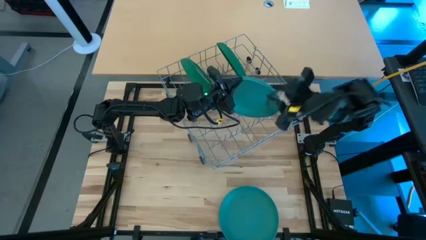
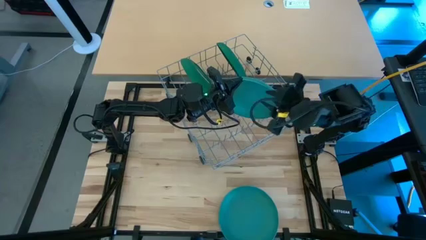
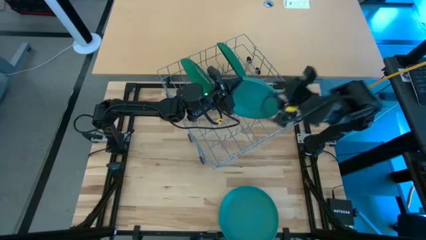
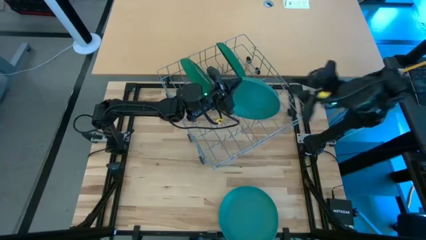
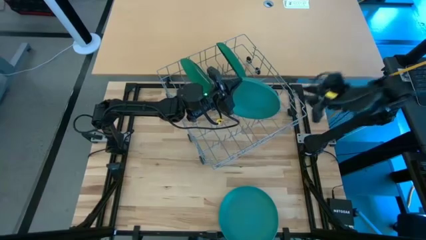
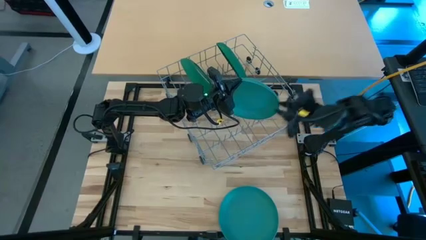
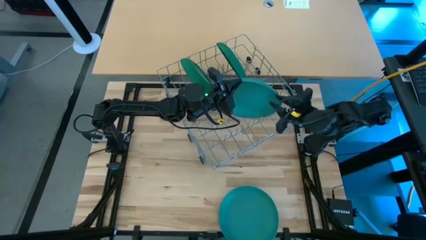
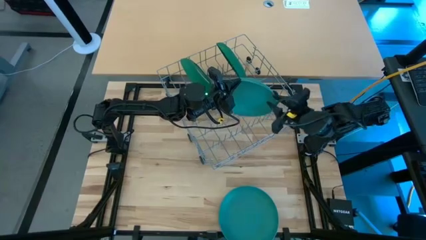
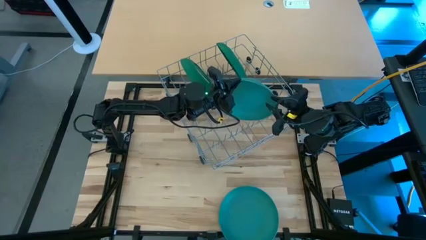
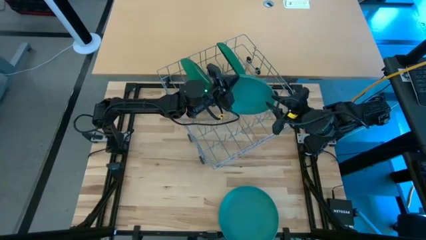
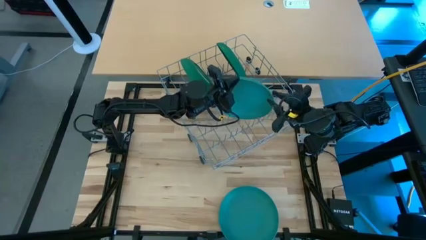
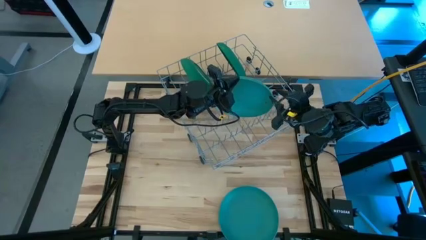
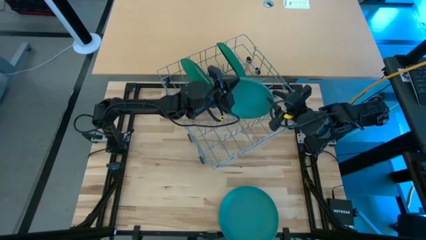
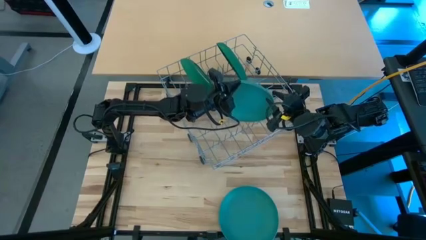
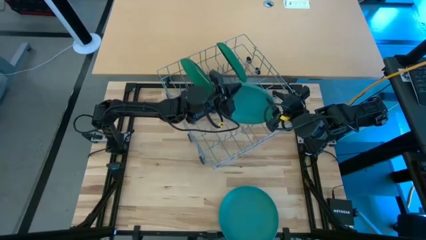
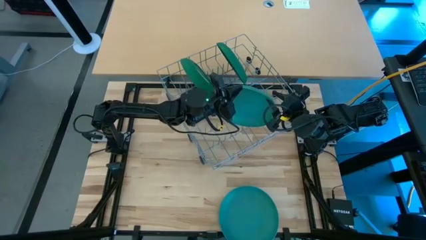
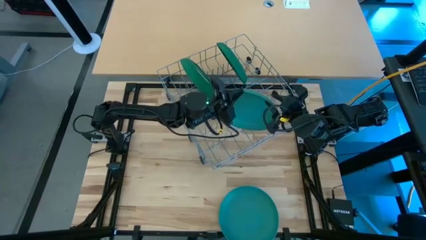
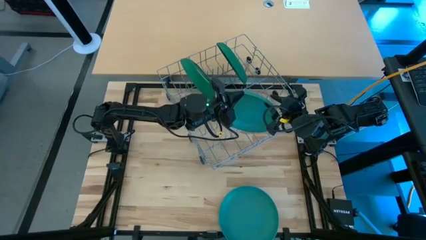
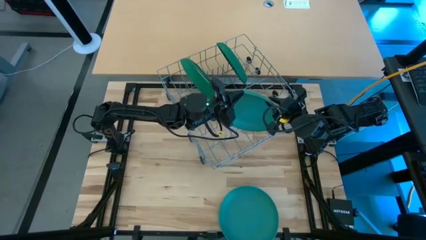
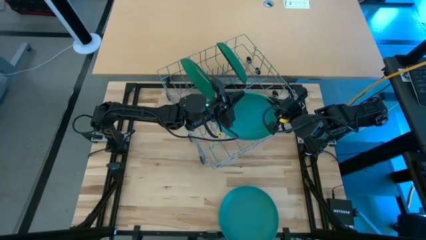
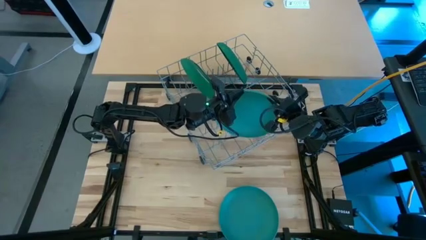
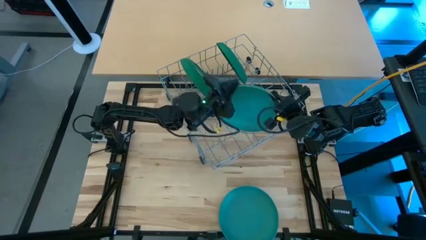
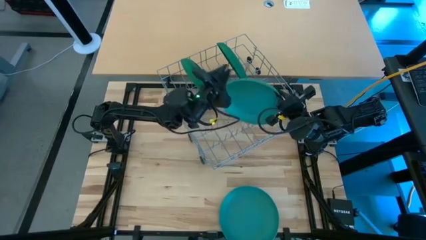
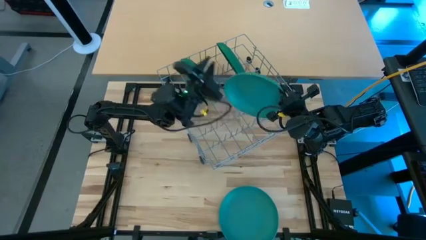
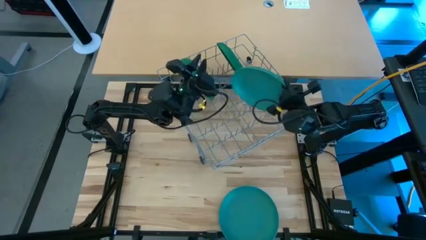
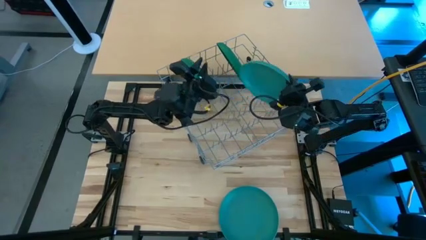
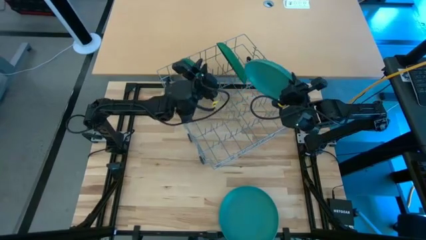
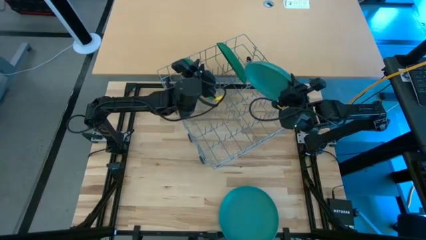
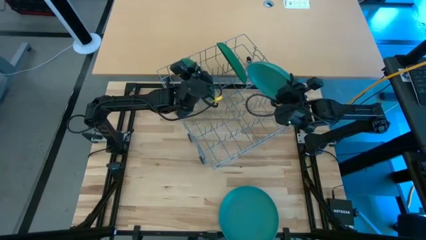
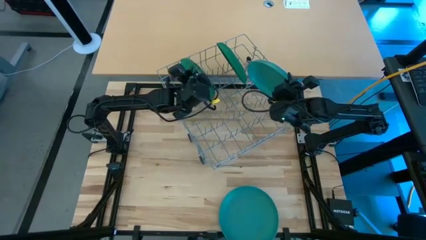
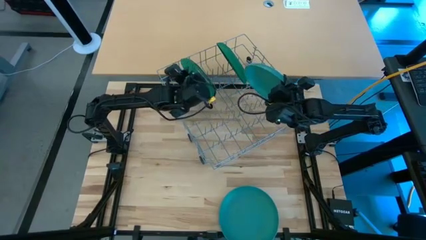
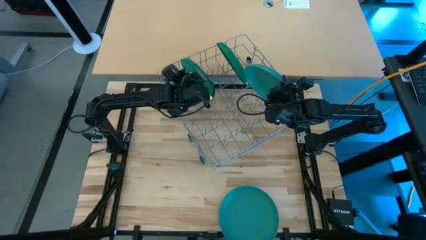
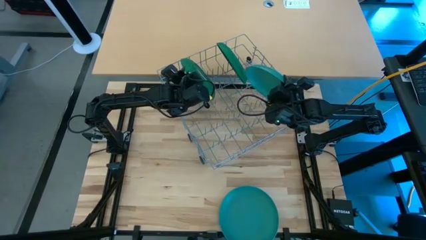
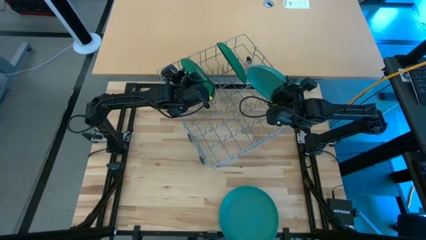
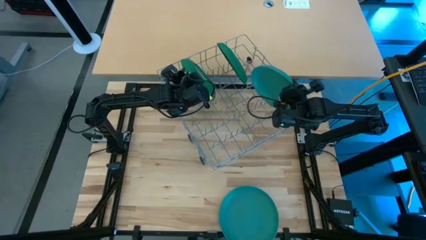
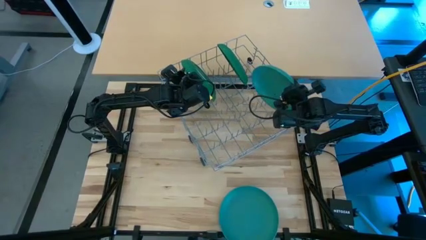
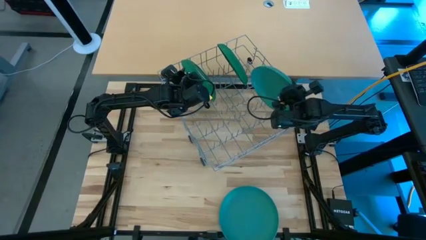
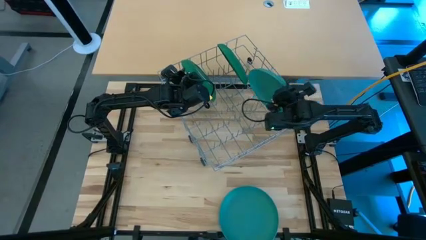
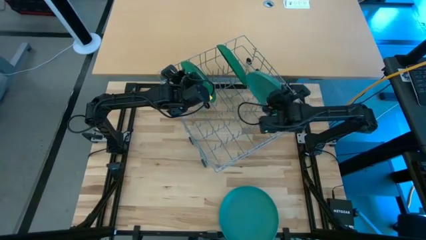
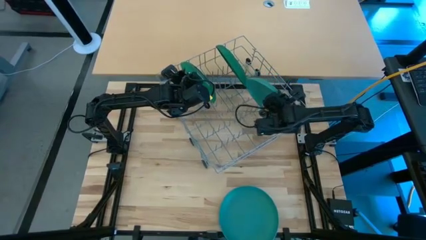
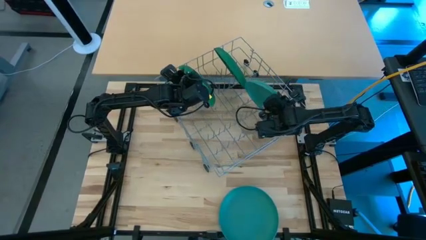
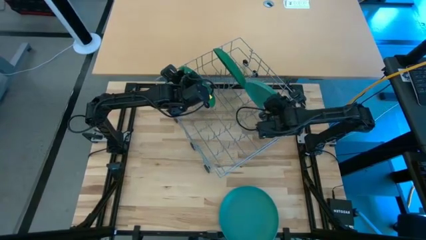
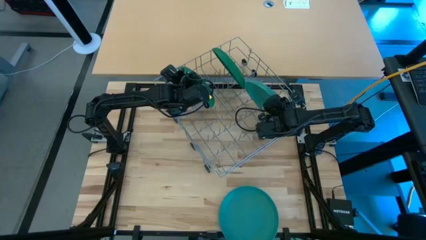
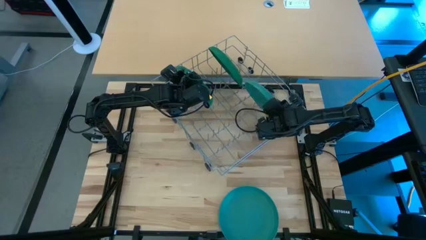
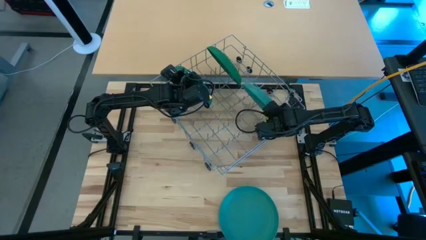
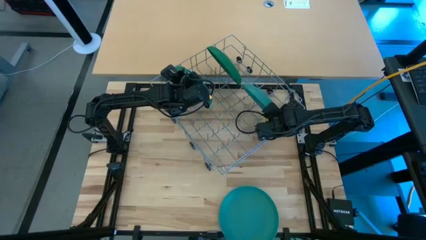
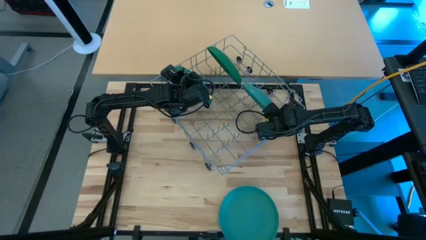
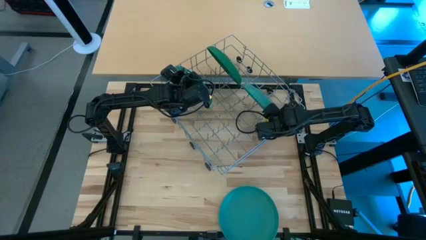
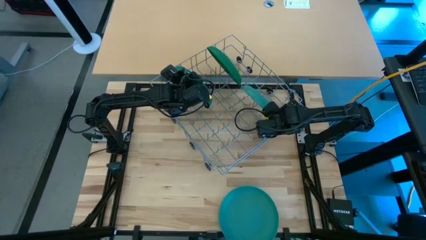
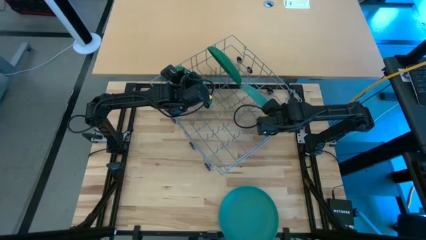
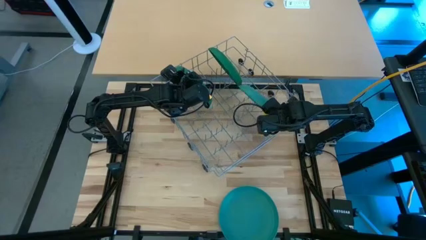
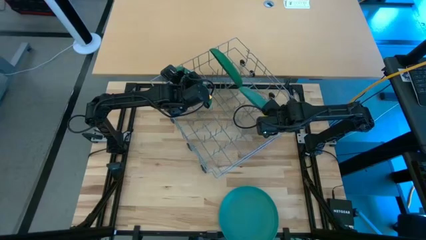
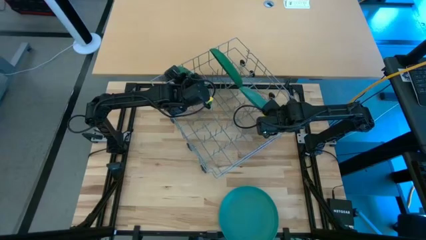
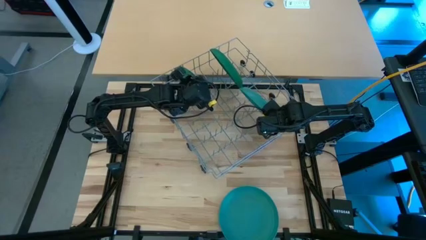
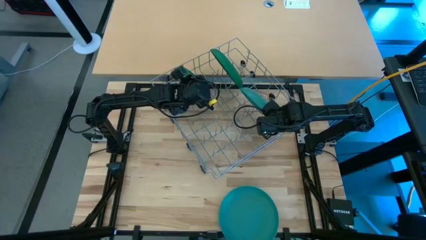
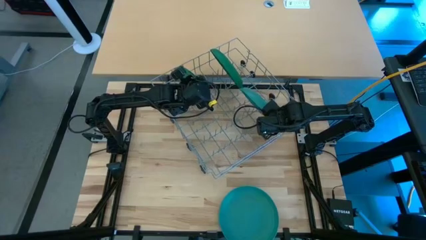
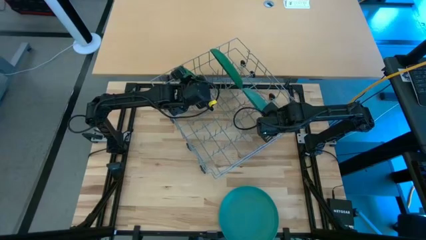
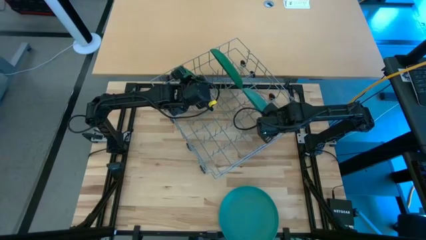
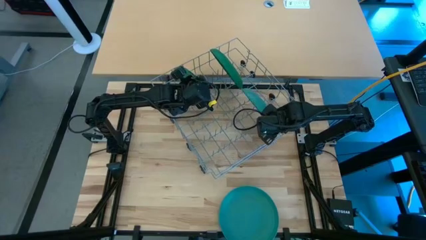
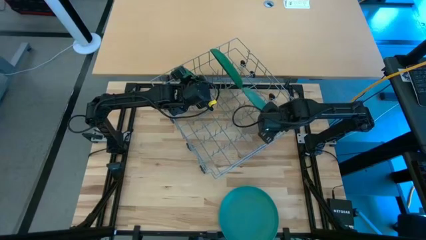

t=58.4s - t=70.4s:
Task: Sort dishes
Put the blue plate into the dish rack

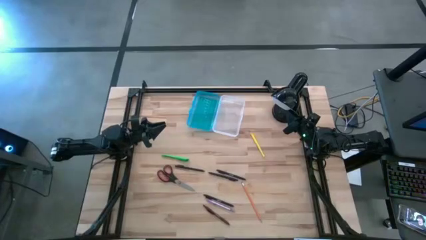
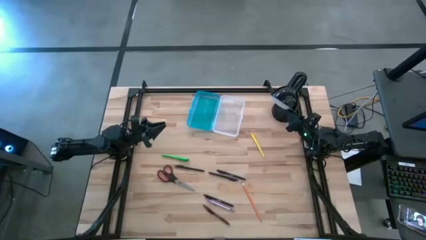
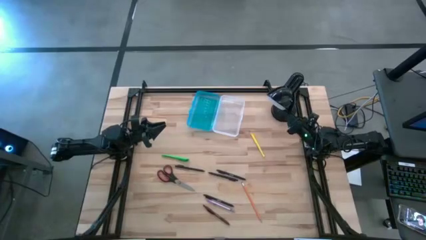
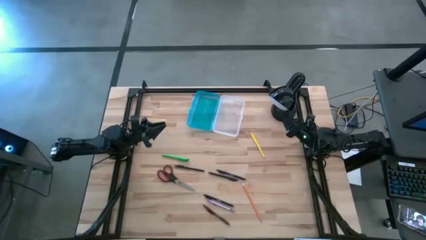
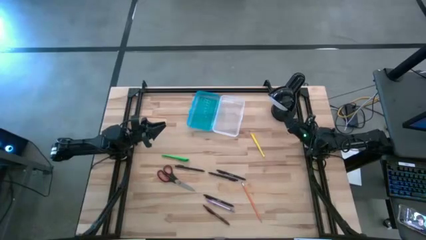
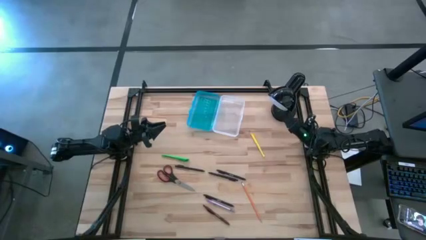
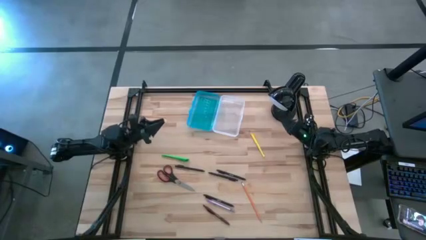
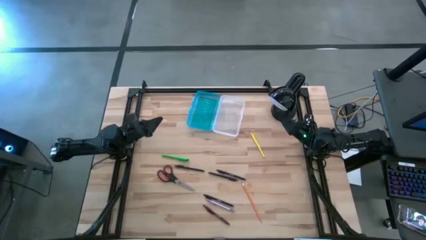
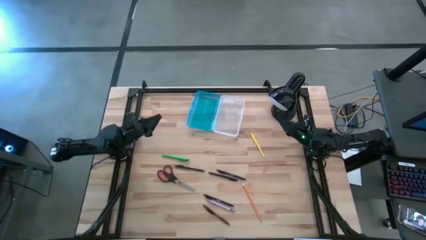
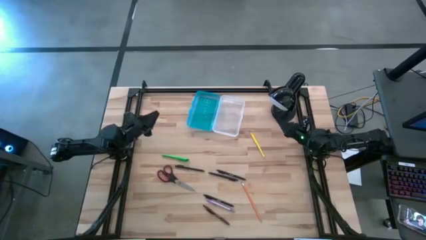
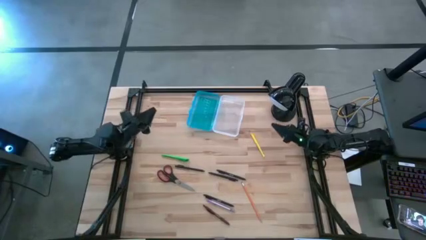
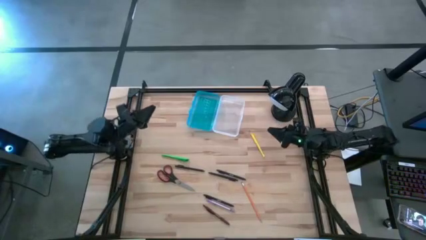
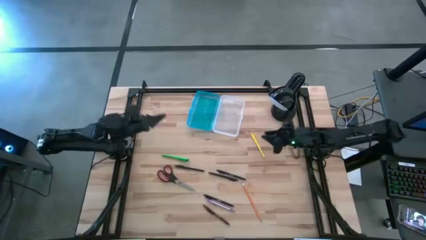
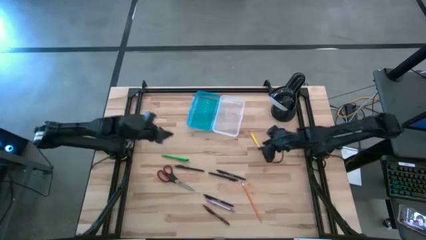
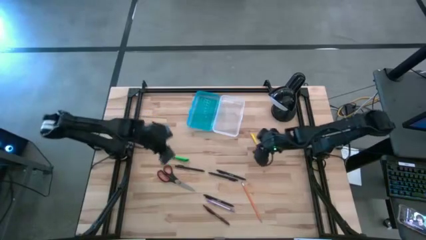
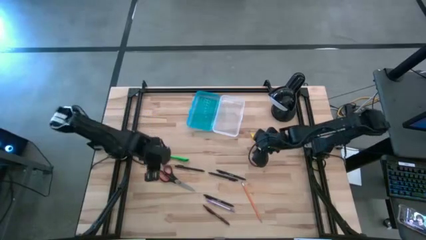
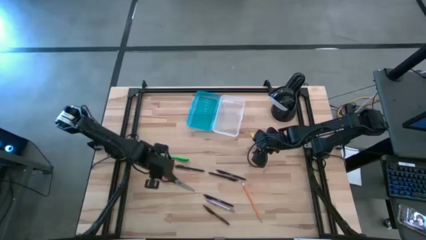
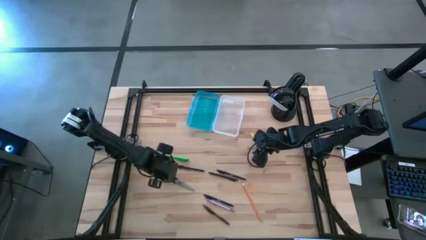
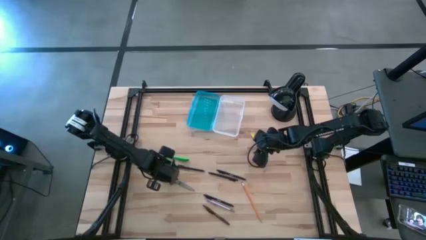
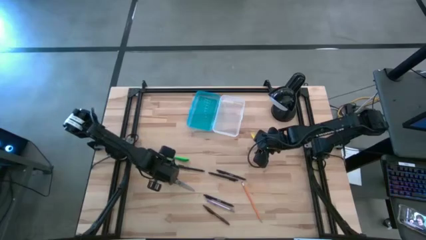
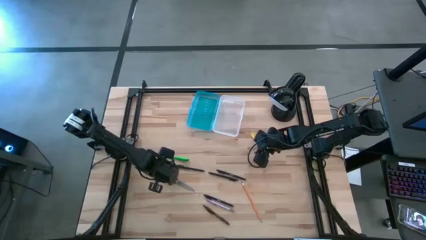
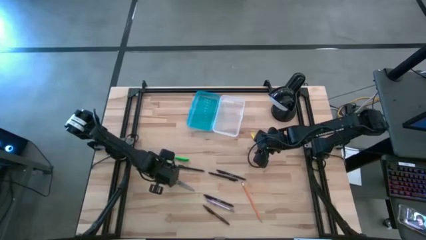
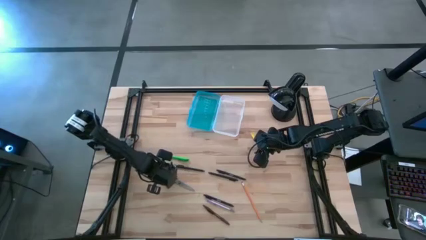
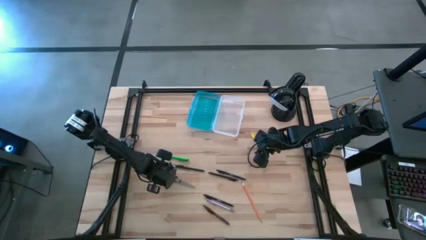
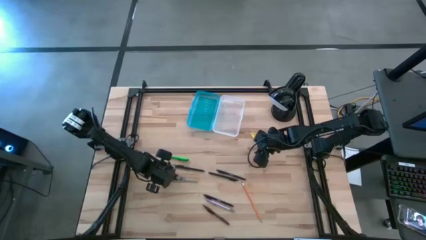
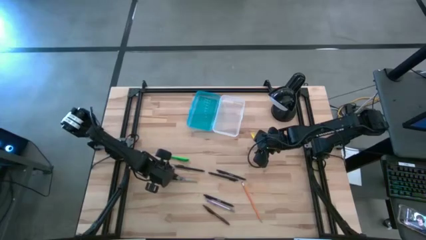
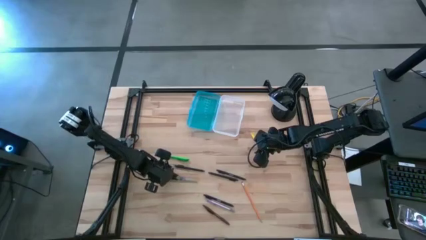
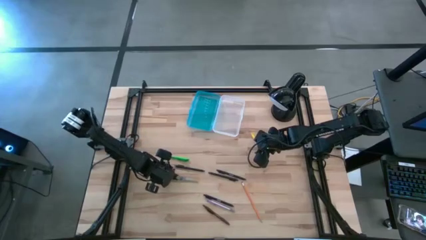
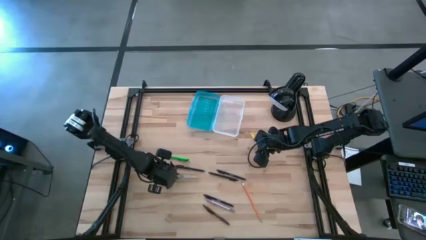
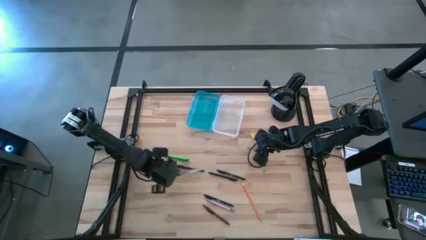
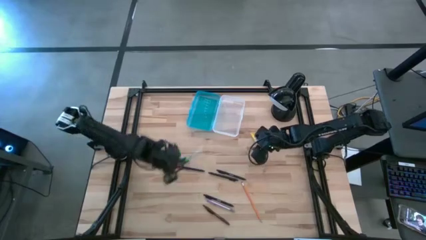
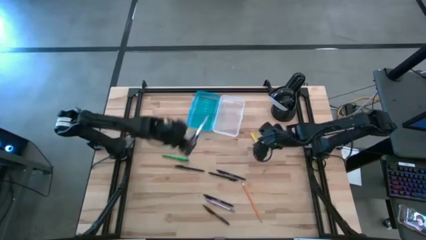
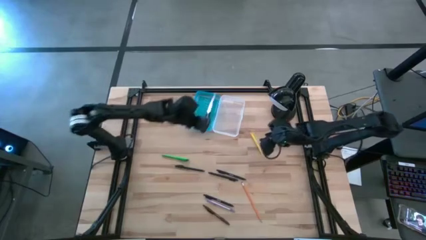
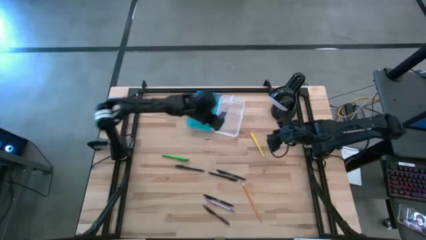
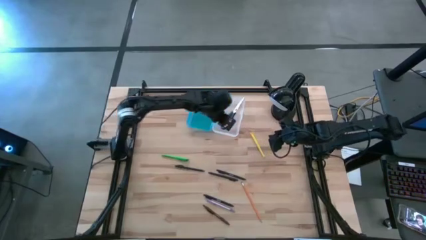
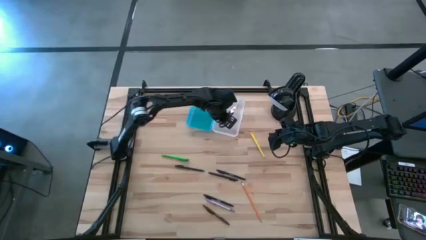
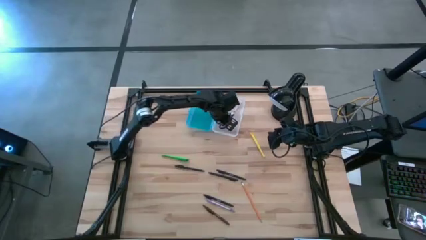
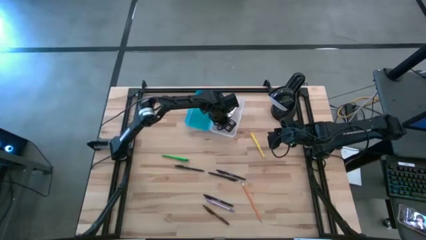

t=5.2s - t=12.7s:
Task: Pick & place school supplies into a supply box
Put the black scissor into the blue supply box
